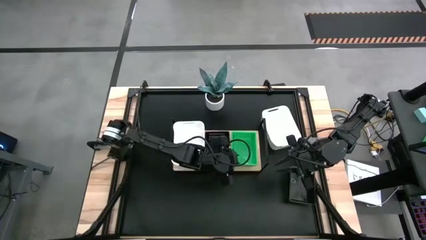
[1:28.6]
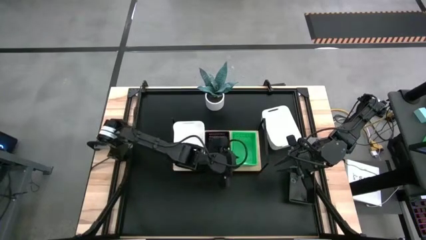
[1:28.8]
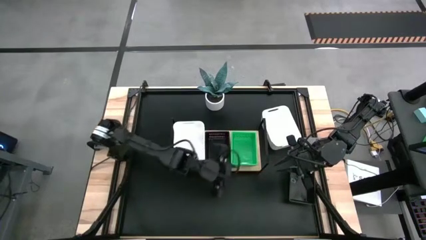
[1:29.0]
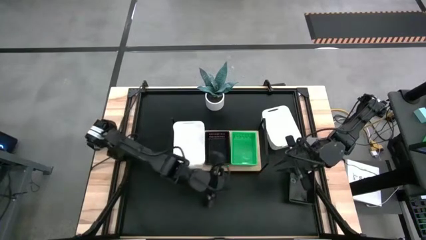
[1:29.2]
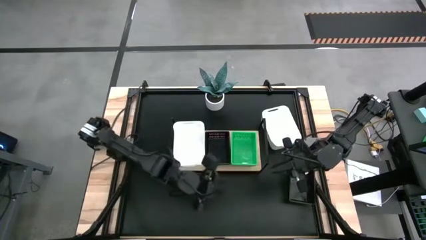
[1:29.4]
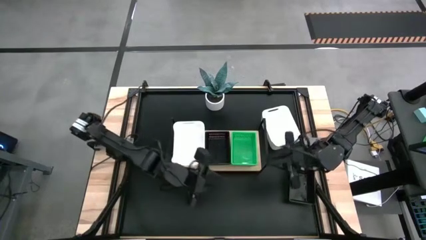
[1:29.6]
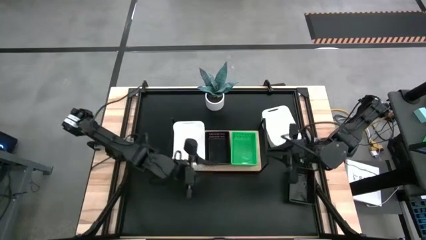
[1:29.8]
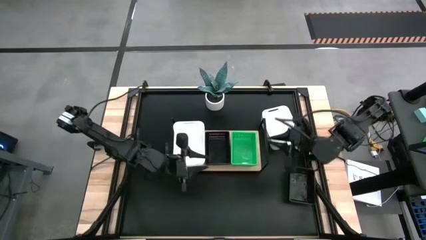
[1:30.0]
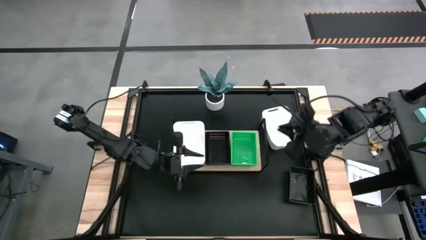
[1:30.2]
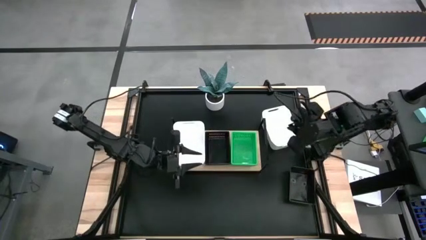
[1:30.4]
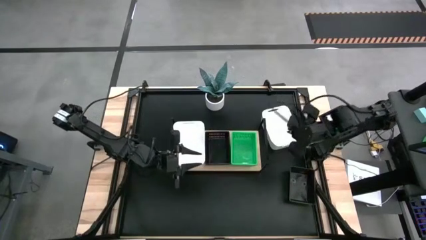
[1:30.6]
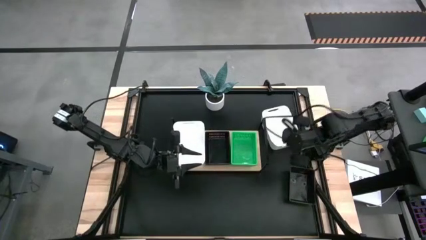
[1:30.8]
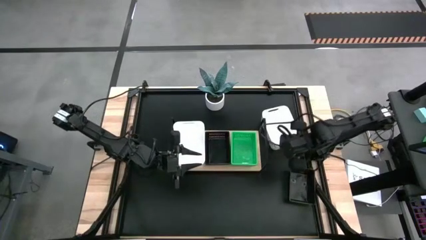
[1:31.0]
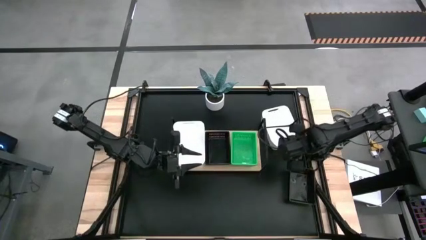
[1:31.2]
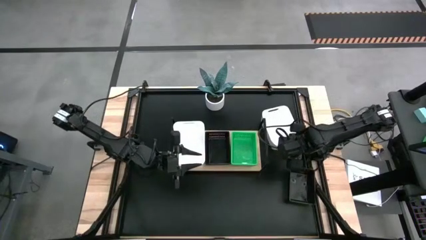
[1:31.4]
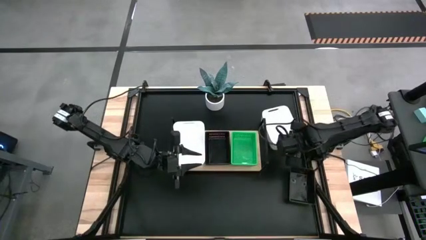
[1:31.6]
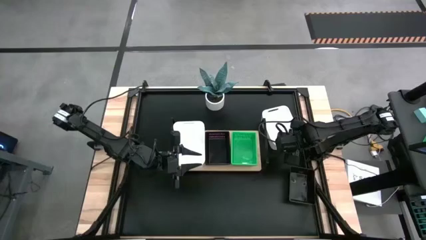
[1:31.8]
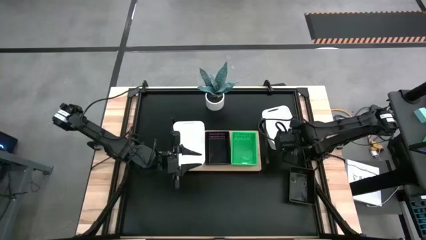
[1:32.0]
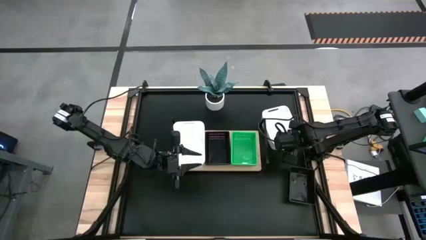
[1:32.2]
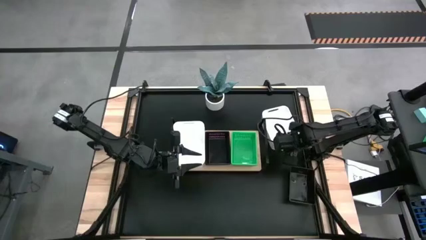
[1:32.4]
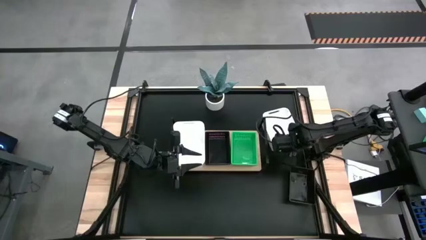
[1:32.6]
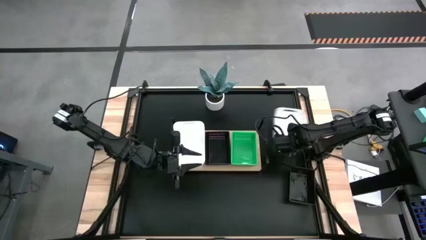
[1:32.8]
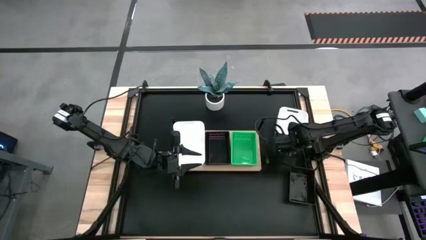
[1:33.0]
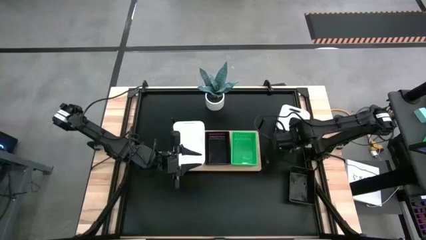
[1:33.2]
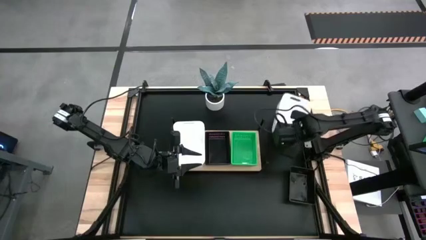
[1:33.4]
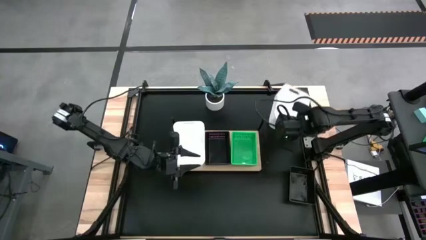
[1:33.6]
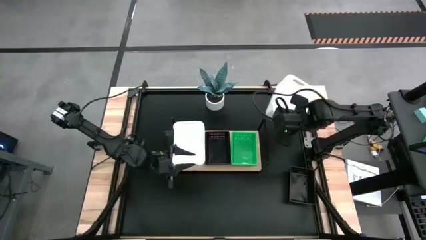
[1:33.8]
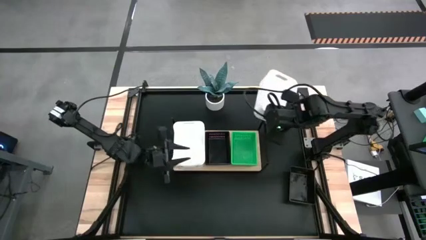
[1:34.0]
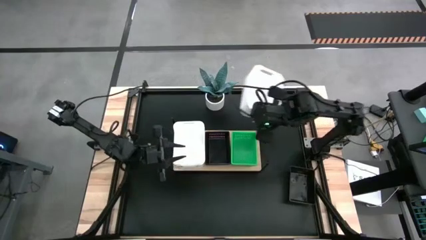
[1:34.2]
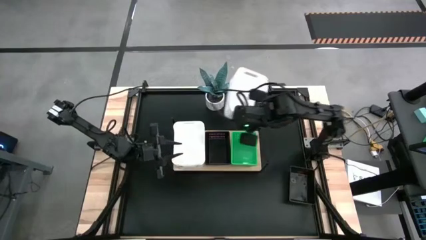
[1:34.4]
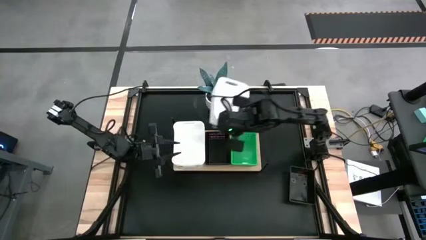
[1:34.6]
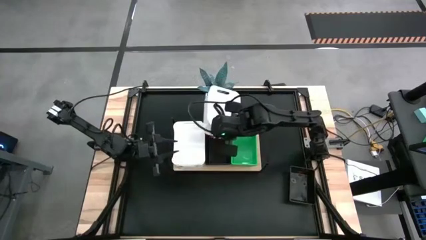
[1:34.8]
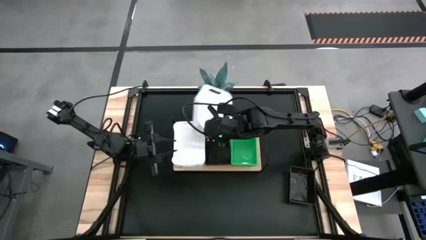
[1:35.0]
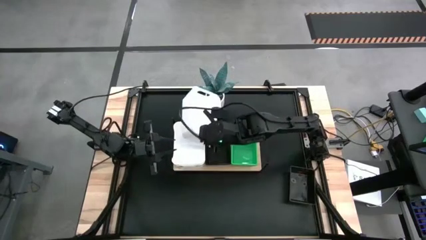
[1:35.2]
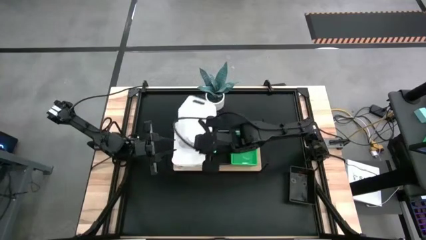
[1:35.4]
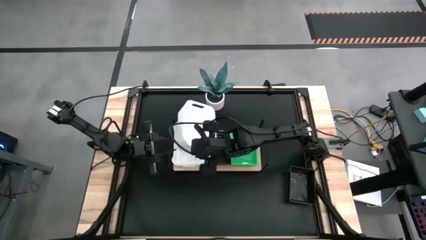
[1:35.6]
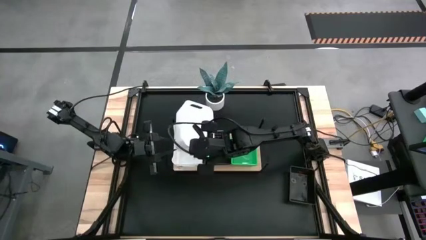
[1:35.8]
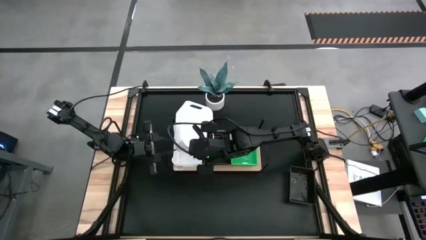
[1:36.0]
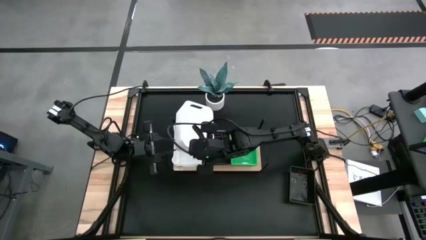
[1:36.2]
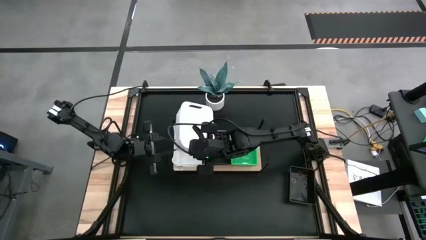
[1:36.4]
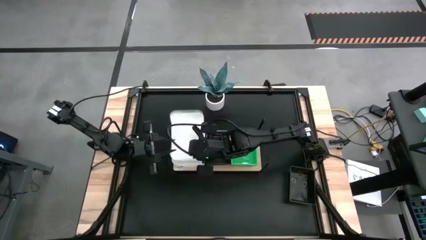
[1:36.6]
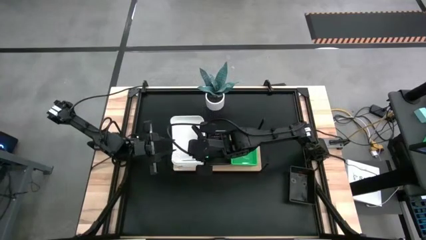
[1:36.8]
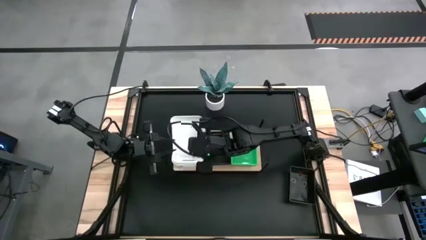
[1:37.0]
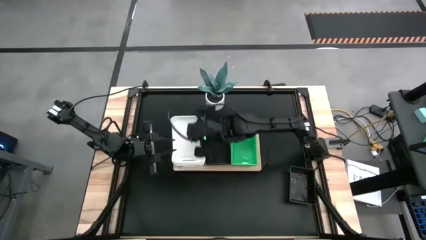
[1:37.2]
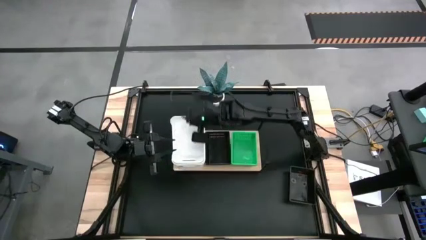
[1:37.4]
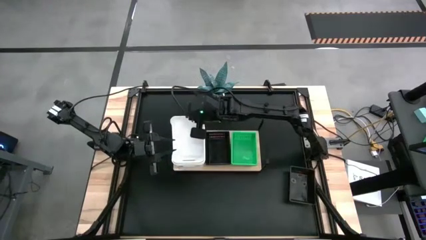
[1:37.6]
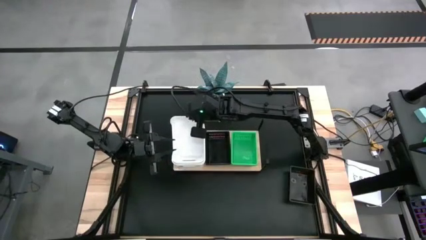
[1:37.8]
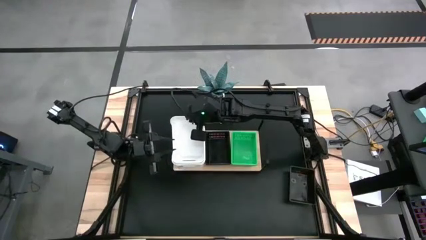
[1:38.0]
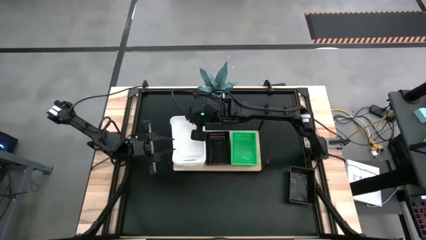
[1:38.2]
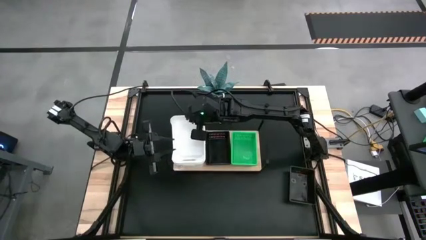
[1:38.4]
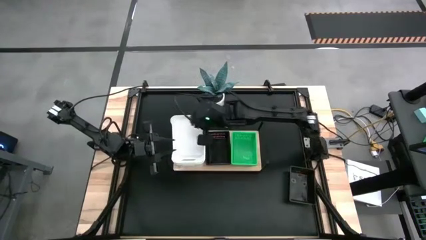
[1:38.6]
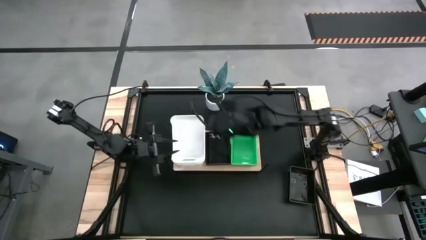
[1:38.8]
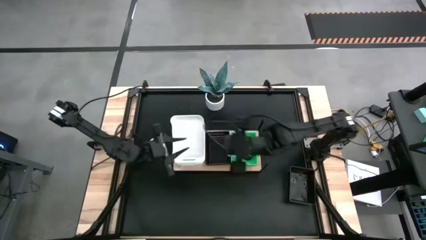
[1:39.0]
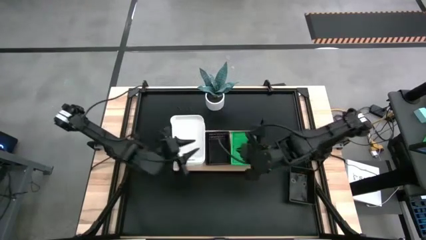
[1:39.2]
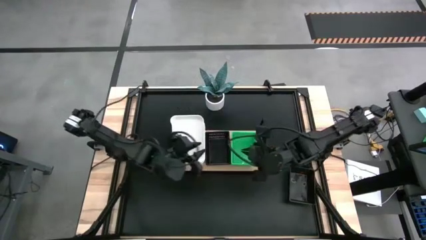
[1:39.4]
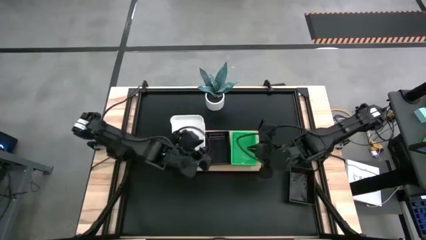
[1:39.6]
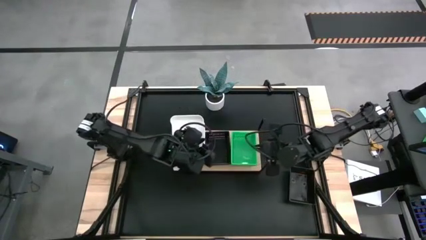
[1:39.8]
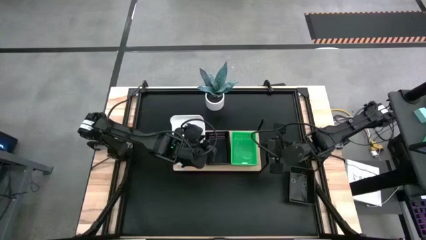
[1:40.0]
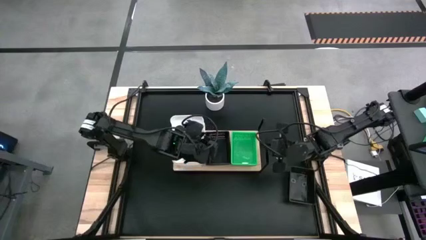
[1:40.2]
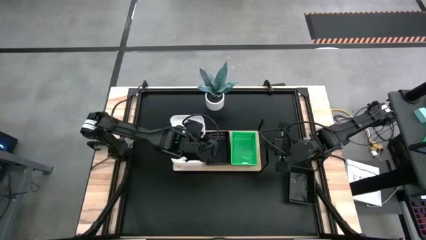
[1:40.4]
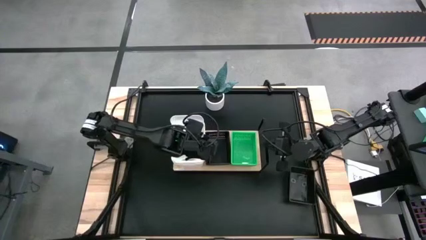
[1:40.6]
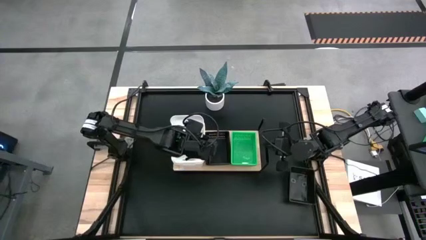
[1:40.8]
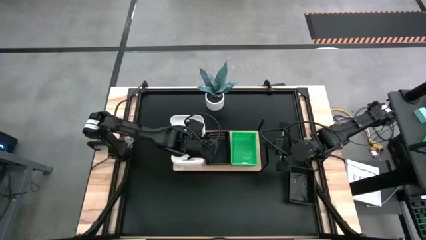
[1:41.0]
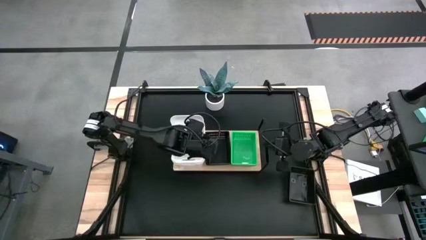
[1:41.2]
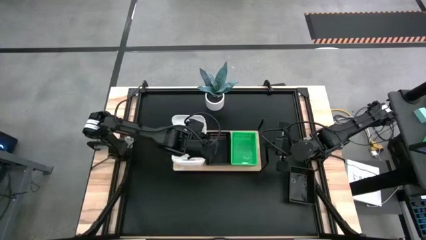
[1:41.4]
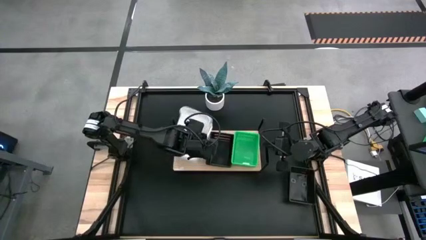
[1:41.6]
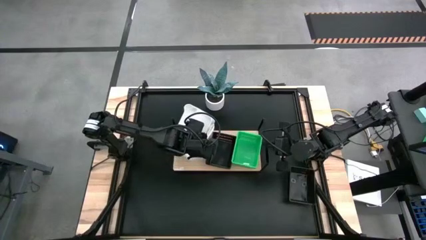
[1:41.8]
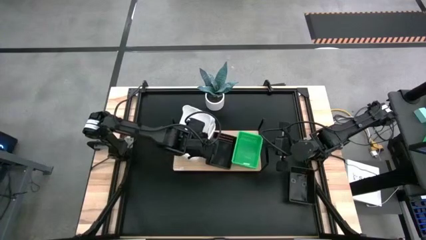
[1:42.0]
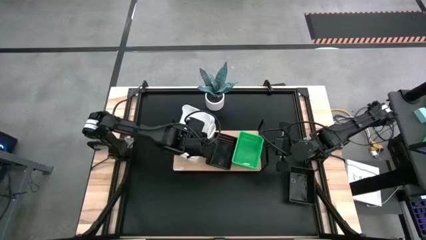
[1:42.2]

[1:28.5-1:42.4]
Task: Stack baskets on shelf by color
Stack the white bin on top of the other white bins on the shelf

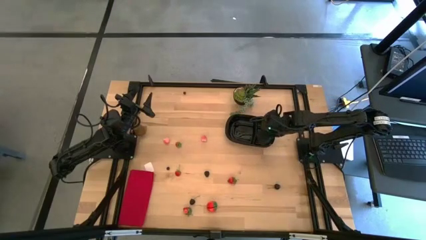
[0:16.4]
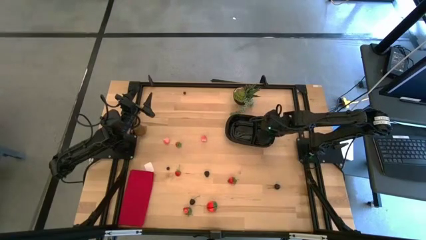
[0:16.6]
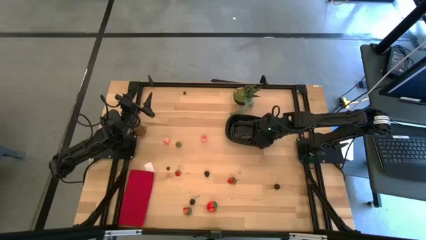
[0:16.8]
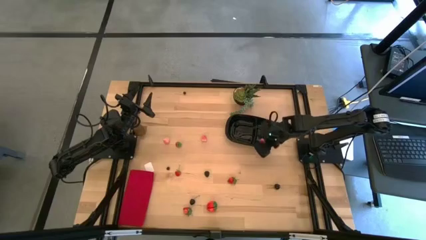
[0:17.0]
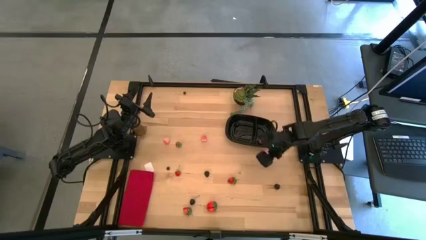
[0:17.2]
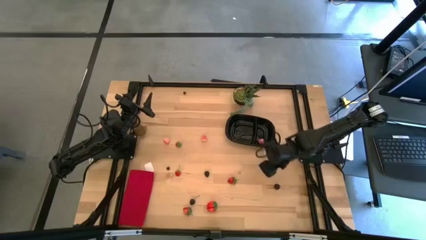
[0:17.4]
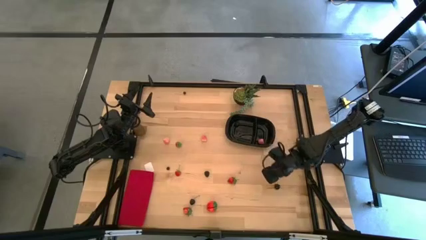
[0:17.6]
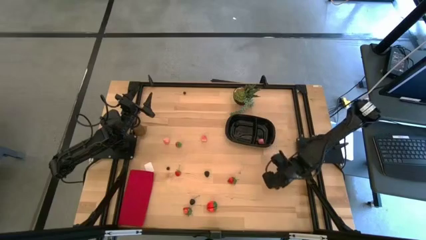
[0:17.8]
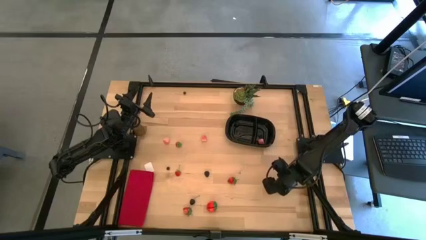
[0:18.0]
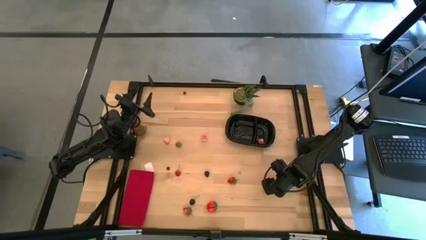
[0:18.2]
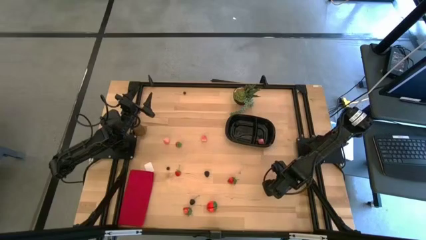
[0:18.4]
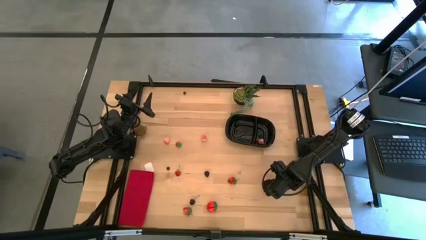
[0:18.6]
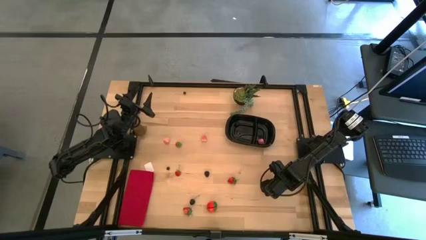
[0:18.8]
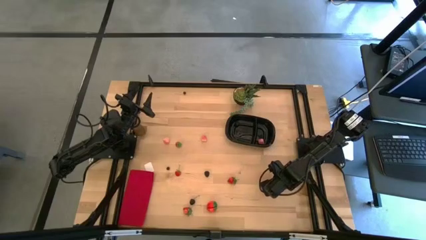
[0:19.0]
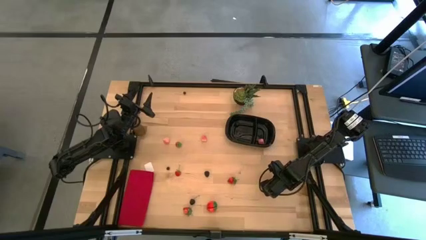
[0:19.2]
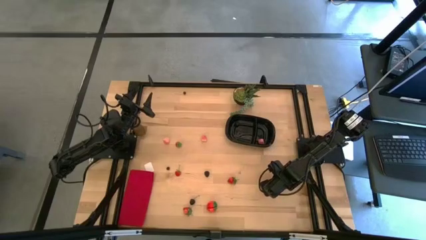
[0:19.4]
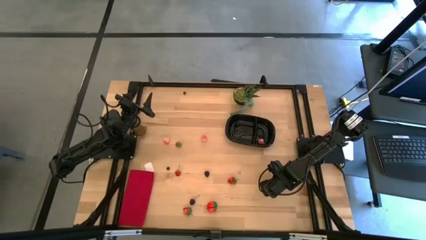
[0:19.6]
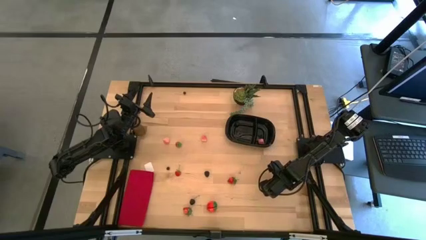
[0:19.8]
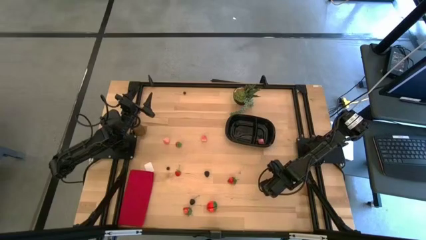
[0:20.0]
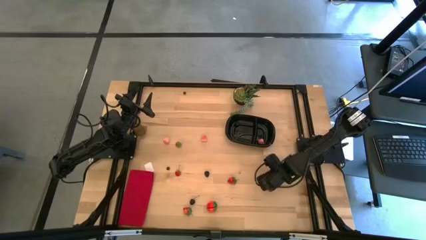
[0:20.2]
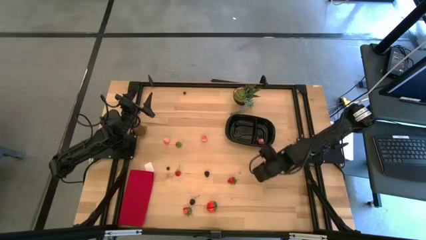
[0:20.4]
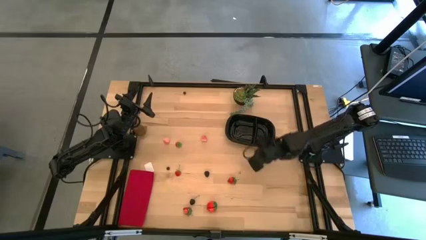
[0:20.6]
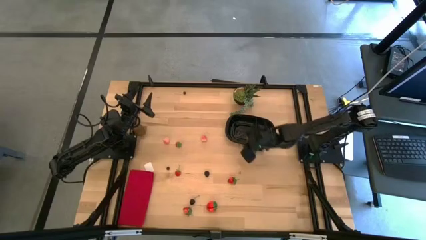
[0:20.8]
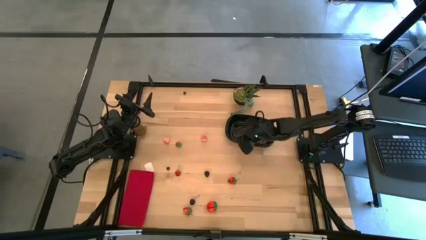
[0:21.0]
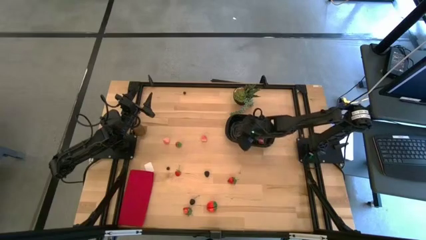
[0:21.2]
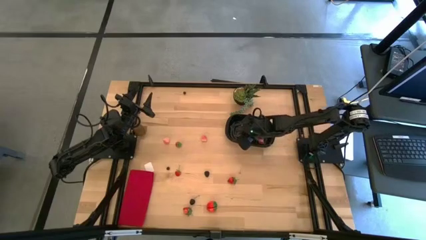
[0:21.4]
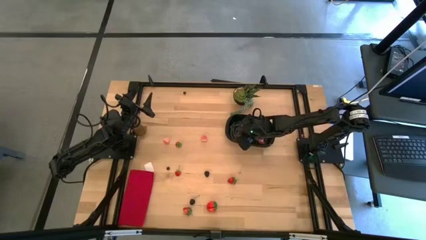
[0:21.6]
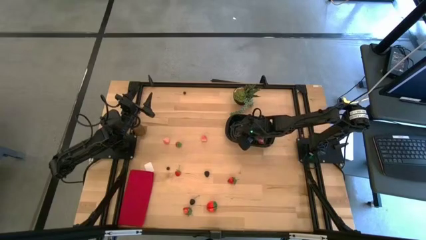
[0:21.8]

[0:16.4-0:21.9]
Task: Pick and placing Produce into tupperware
Put the black cherry into the of the black bin
